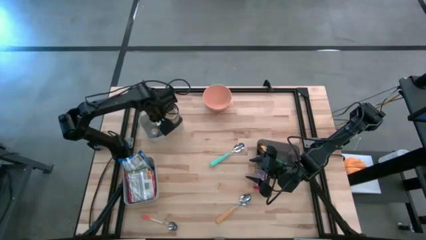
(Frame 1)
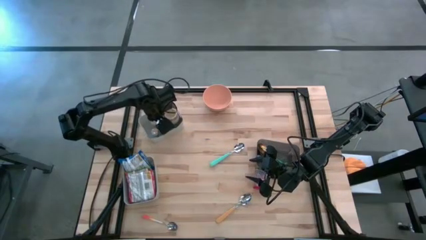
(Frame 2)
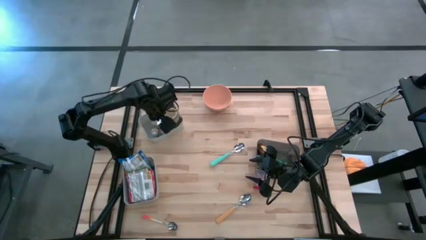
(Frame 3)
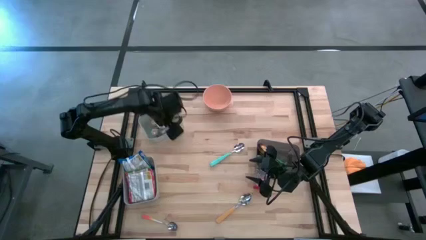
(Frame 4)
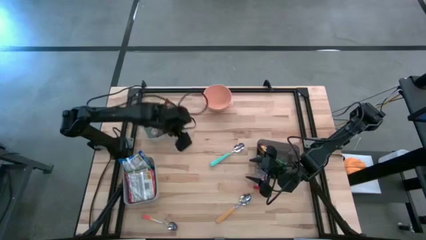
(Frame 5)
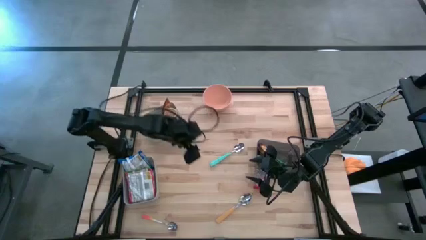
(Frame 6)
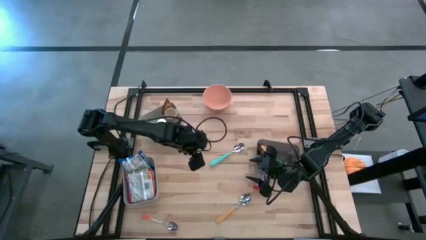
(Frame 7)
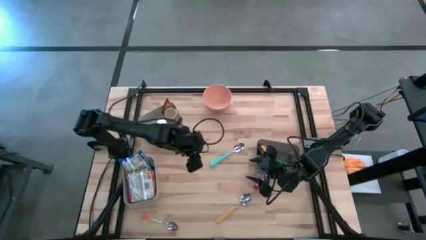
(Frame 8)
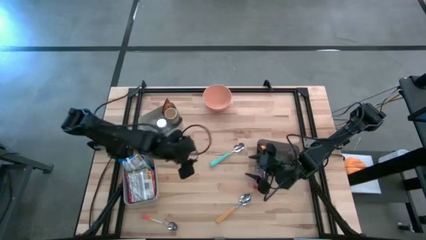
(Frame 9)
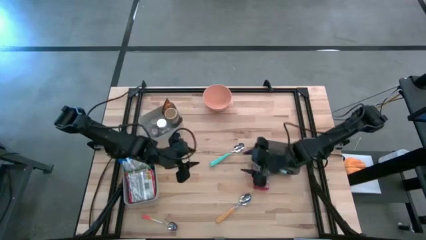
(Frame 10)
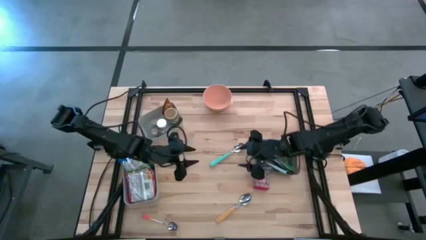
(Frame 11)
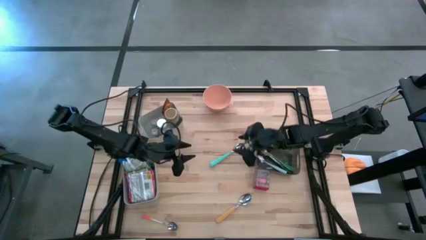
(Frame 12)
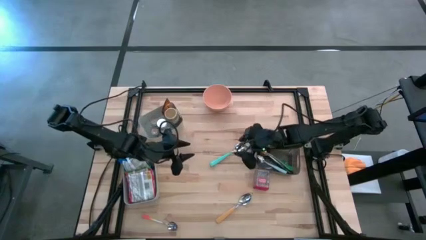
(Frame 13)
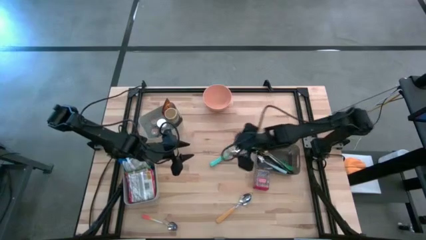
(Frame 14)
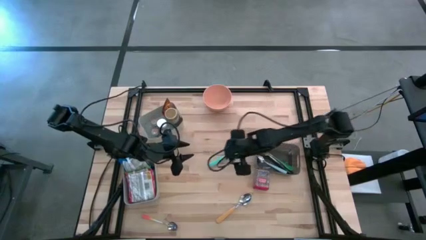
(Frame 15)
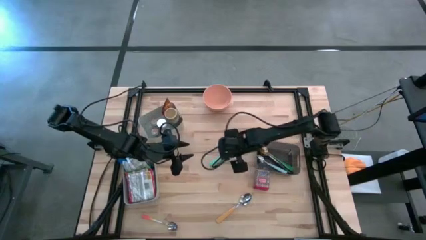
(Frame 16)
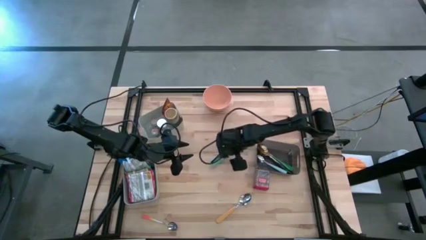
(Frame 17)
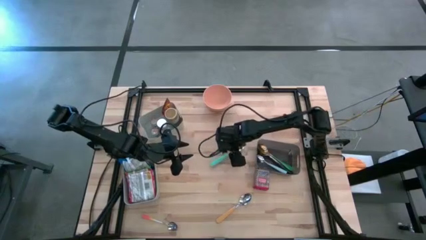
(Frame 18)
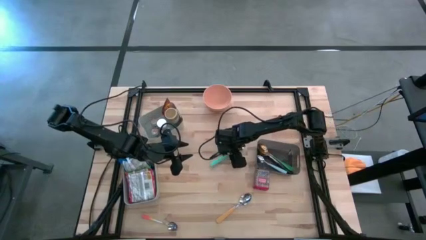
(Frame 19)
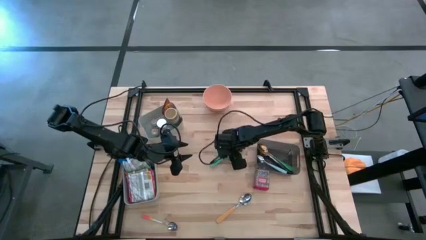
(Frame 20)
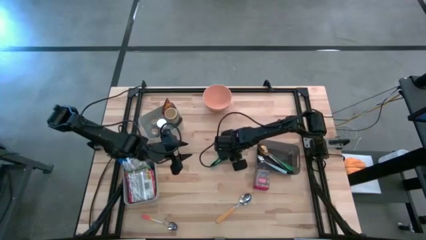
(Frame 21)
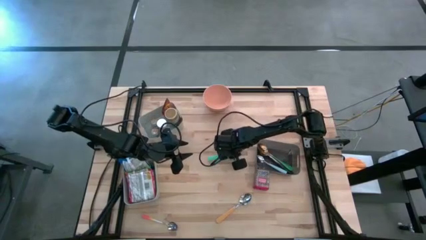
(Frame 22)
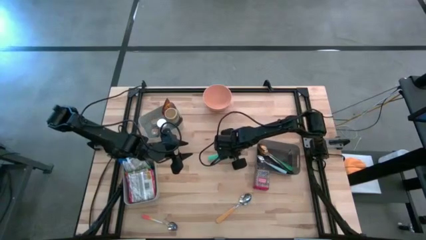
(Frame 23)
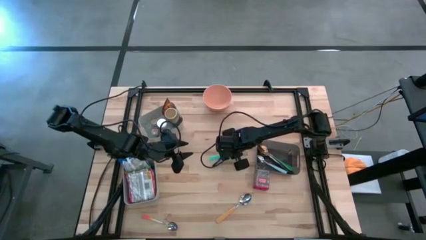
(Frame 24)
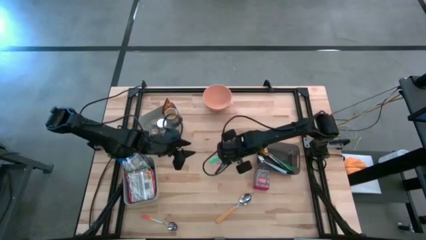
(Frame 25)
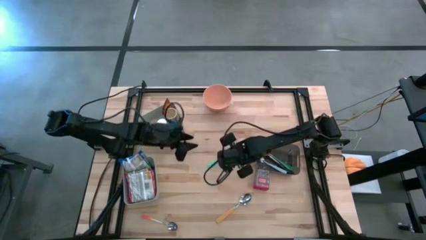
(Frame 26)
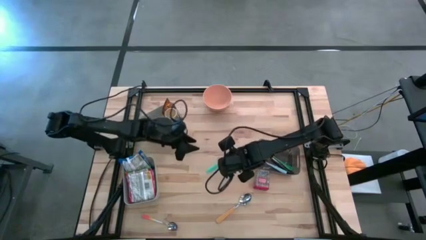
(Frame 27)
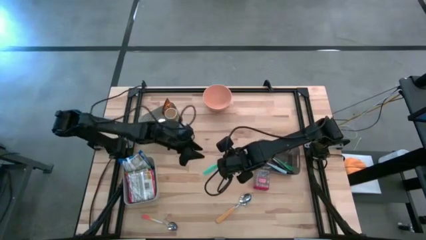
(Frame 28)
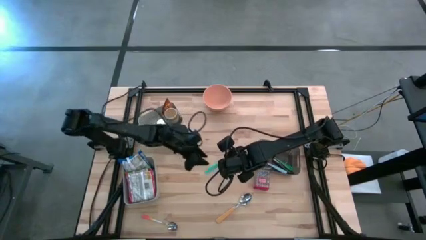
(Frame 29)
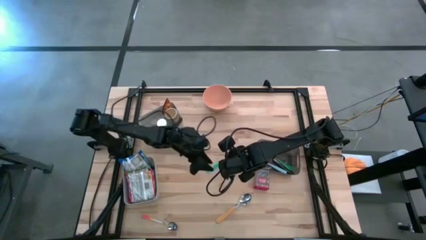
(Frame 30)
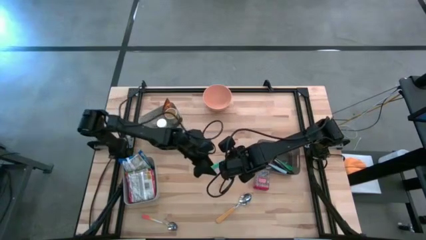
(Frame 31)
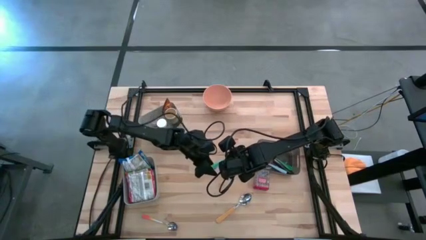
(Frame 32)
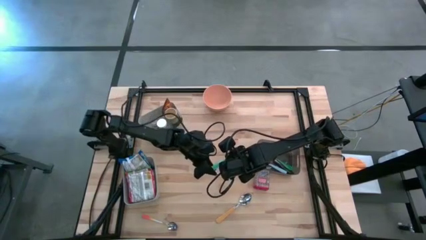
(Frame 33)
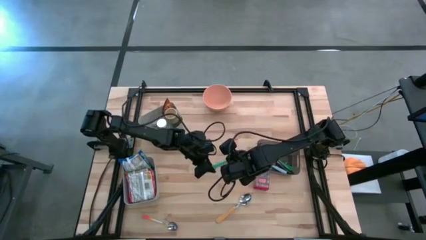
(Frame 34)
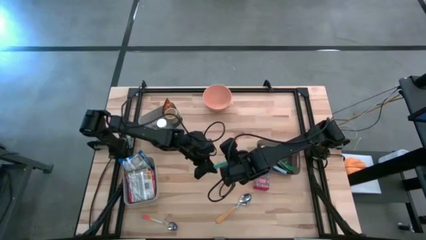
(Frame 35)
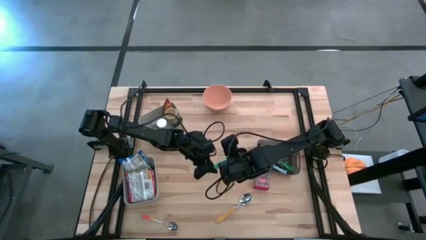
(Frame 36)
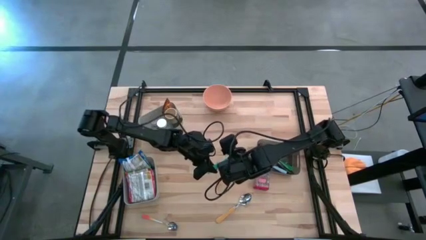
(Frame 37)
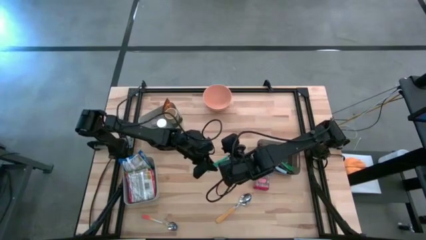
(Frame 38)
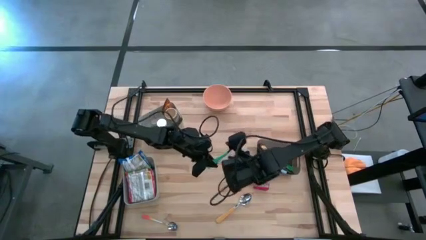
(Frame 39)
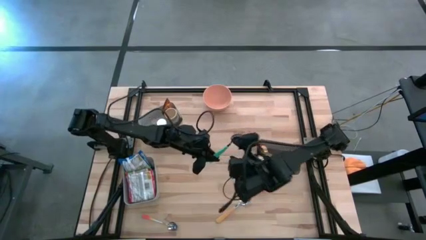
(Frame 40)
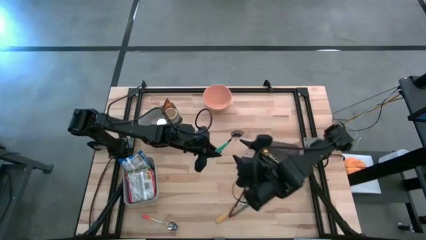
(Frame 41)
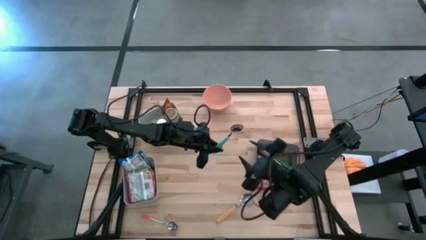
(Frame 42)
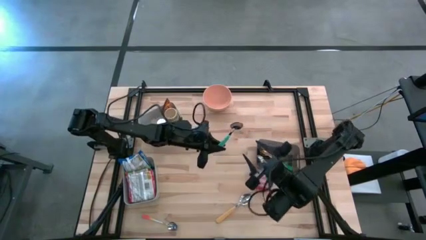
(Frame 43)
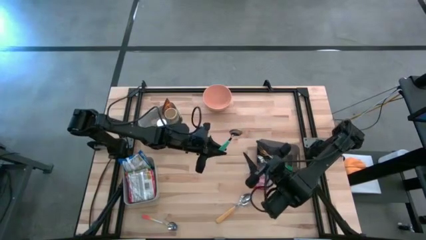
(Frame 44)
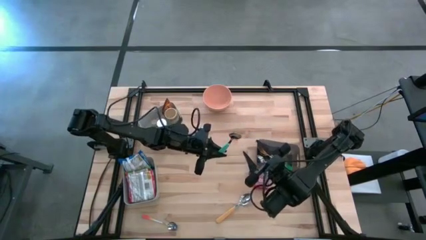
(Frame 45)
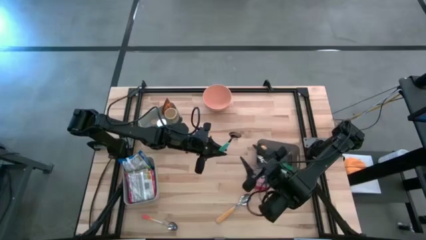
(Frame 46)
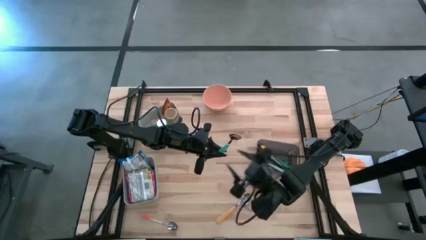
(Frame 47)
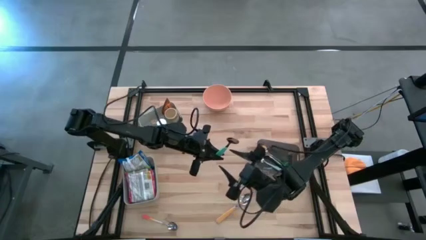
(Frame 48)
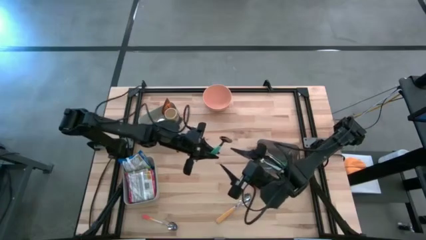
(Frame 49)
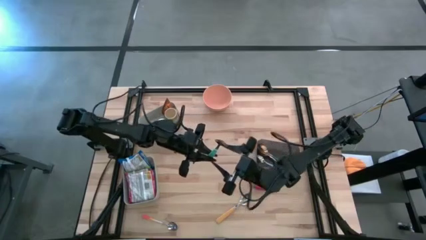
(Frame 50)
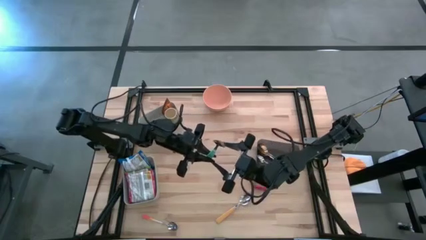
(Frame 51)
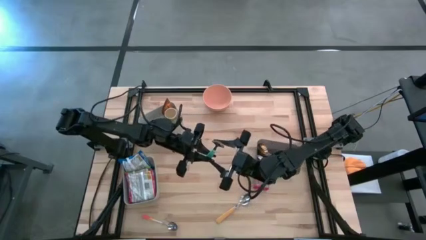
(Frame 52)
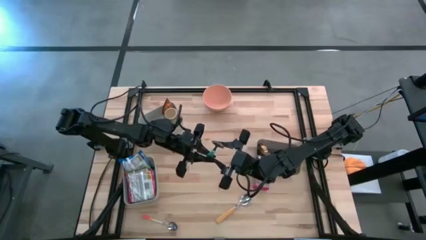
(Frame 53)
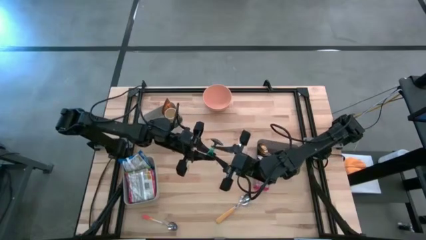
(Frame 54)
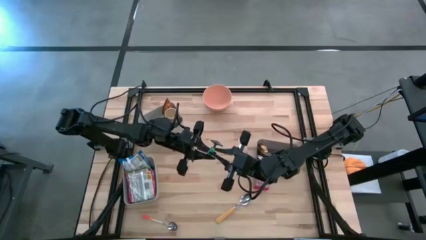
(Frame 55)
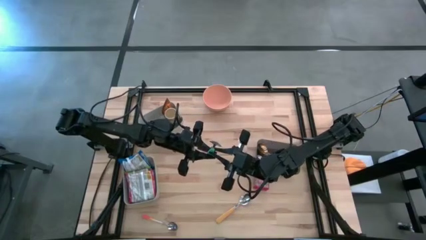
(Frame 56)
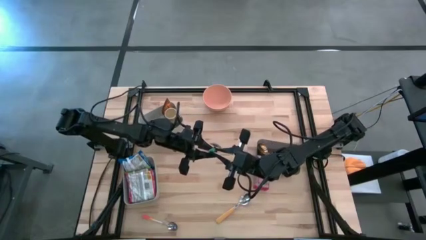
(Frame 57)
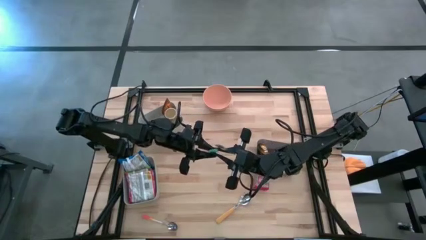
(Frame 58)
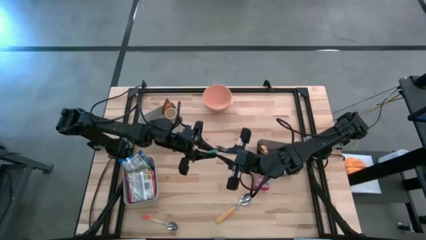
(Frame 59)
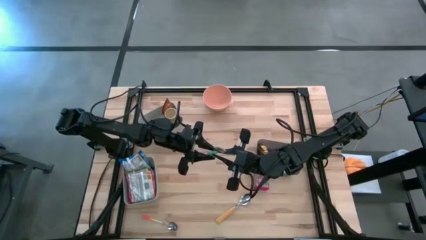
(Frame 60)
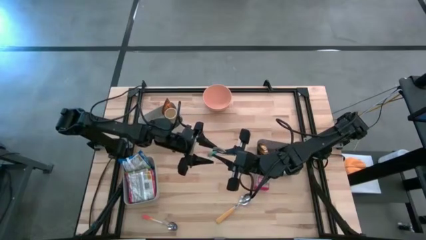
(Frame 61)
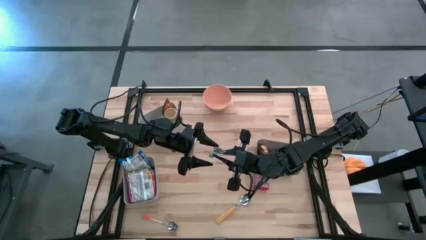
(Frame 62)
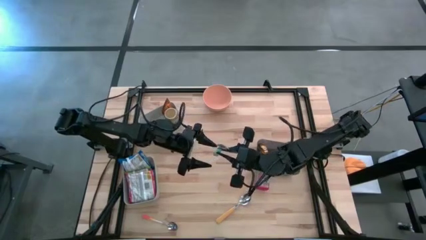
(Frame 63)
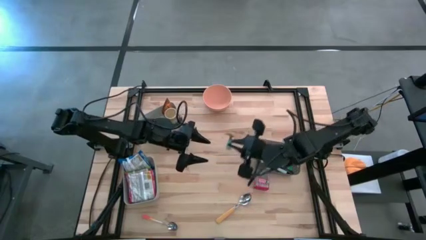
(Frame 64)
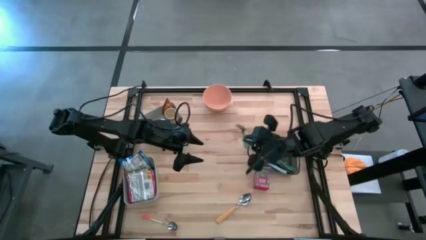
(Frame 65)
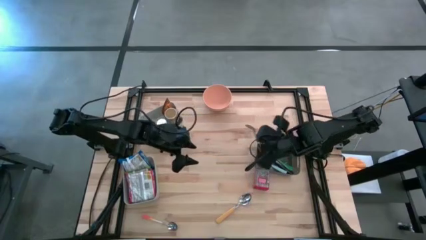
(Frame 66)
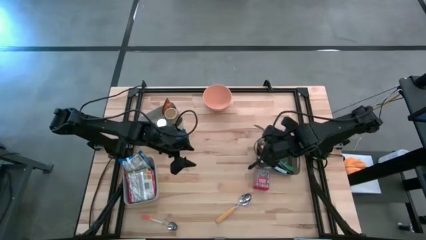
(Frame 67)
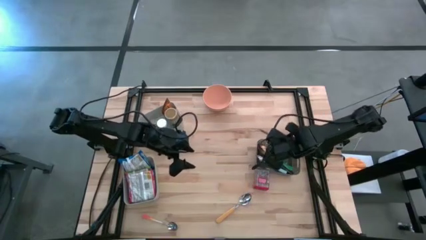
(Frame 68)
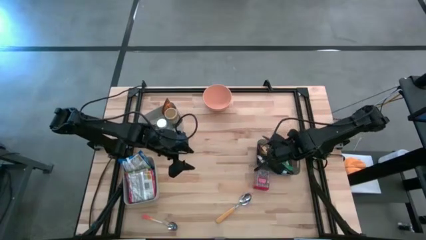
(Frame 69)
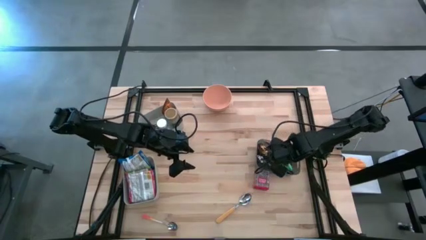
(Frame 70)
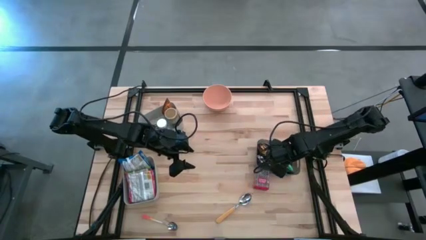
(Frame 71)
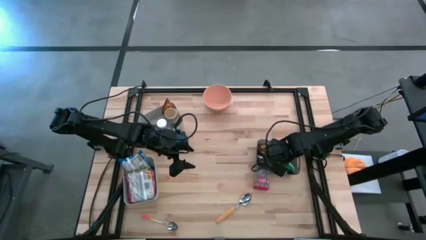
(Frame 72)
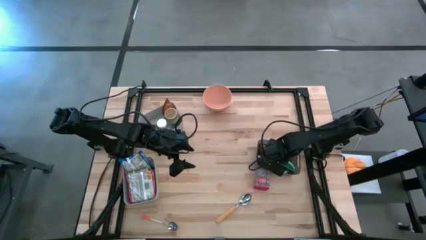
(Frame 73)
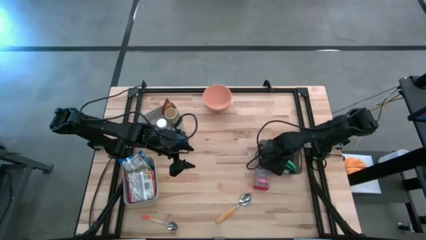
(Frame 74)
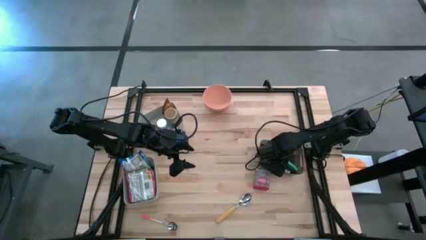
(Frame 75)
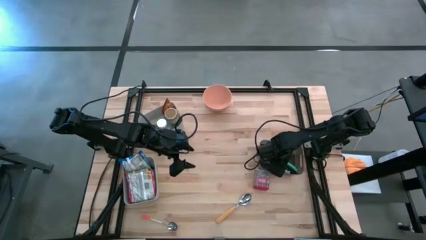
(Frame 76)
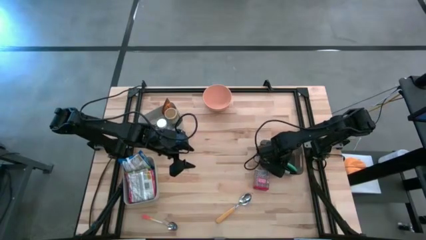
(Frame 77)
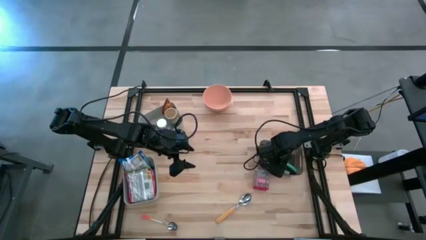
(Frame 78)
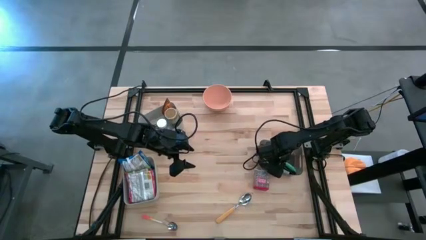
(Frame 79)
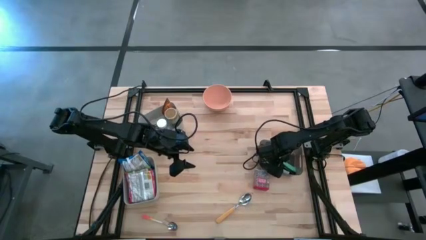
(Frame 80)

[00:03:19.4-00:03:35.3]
Put the light blue spoon into the black bin
